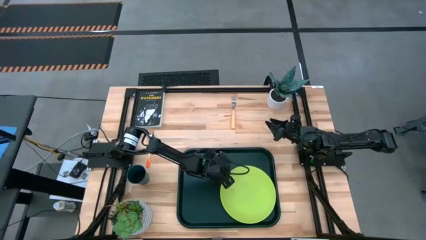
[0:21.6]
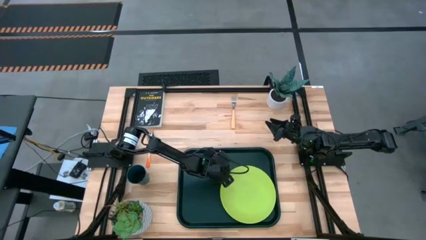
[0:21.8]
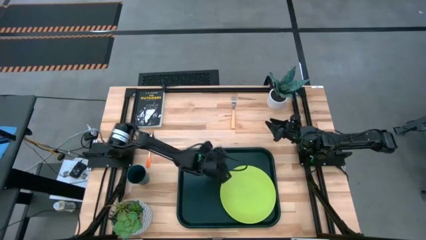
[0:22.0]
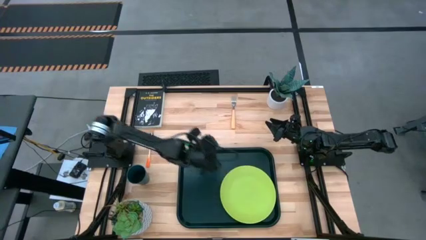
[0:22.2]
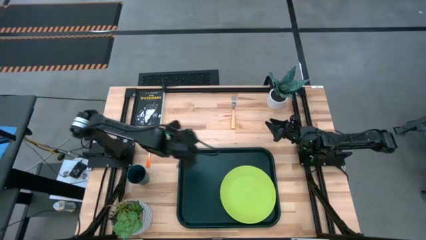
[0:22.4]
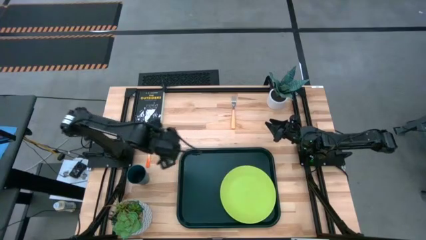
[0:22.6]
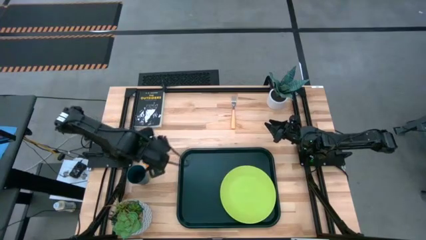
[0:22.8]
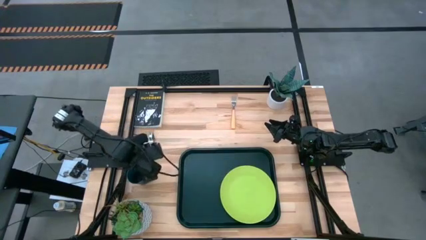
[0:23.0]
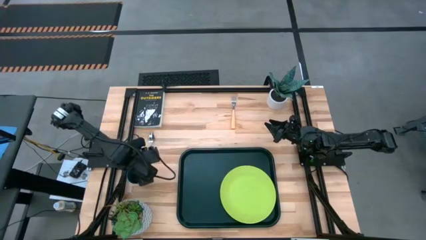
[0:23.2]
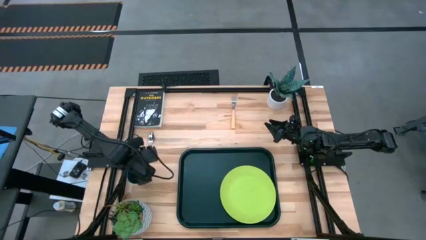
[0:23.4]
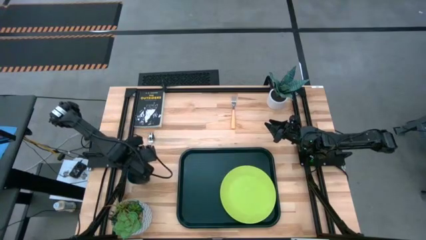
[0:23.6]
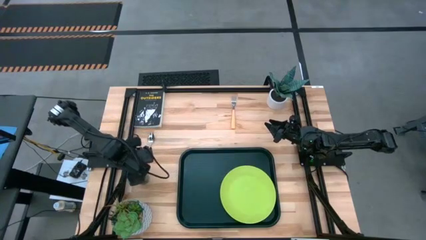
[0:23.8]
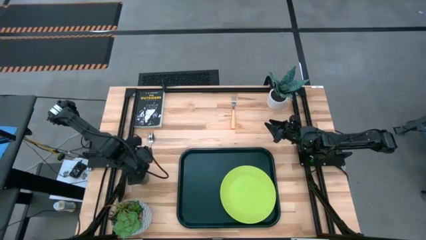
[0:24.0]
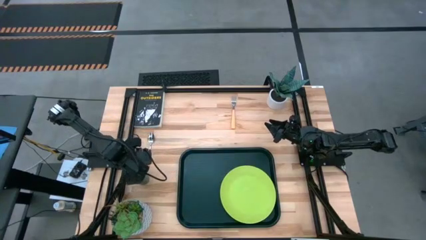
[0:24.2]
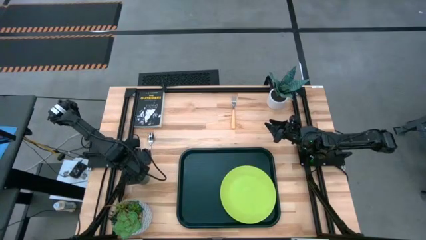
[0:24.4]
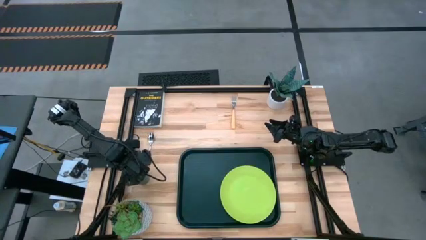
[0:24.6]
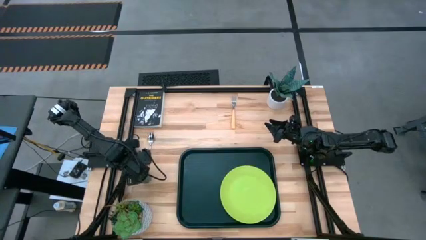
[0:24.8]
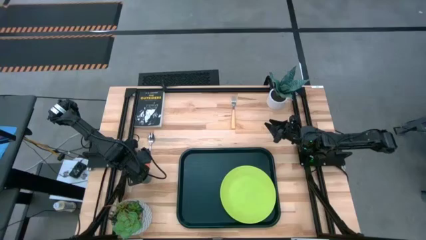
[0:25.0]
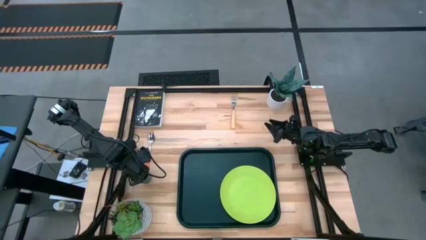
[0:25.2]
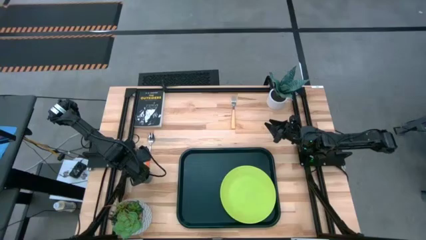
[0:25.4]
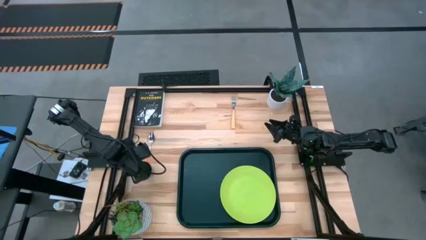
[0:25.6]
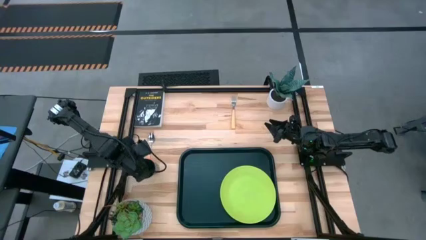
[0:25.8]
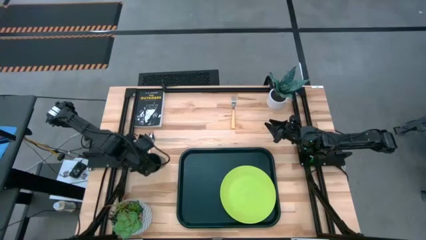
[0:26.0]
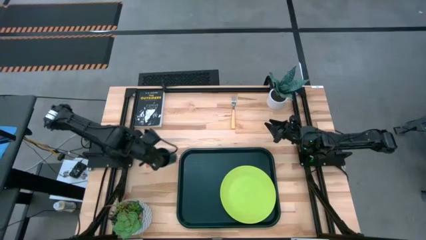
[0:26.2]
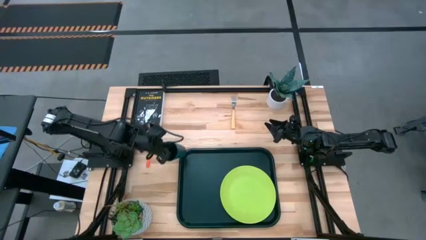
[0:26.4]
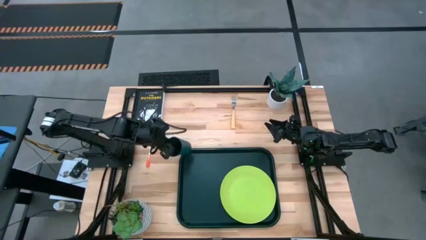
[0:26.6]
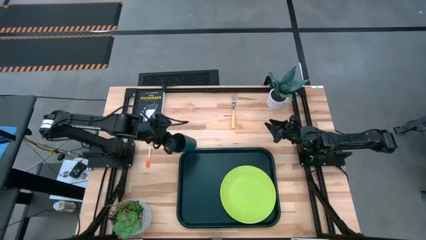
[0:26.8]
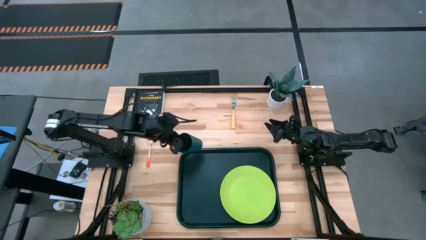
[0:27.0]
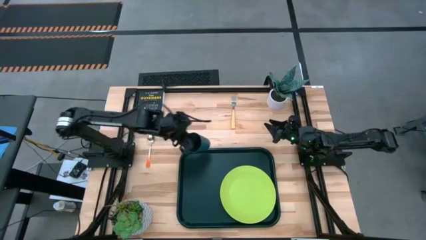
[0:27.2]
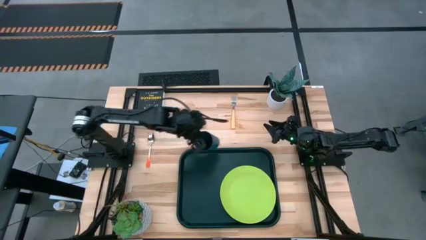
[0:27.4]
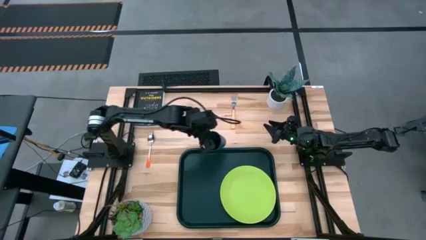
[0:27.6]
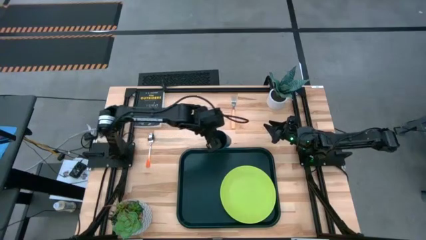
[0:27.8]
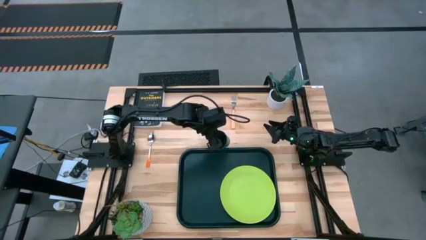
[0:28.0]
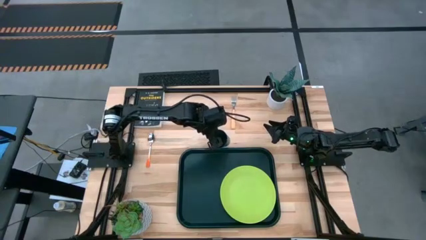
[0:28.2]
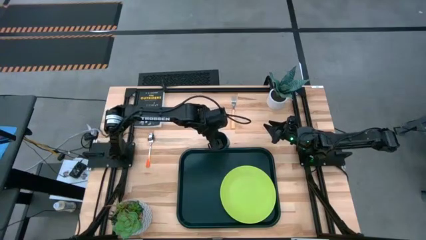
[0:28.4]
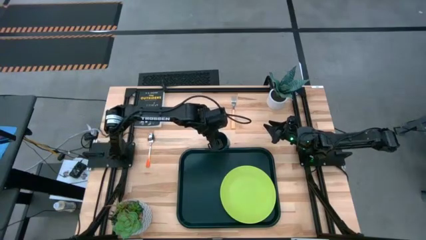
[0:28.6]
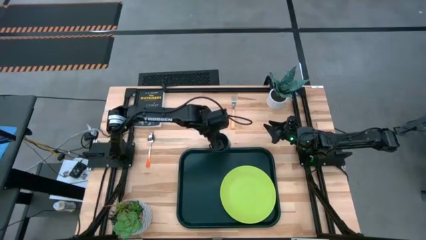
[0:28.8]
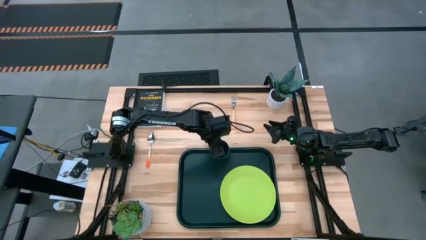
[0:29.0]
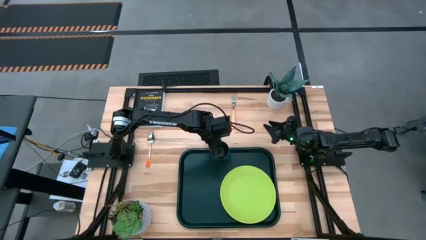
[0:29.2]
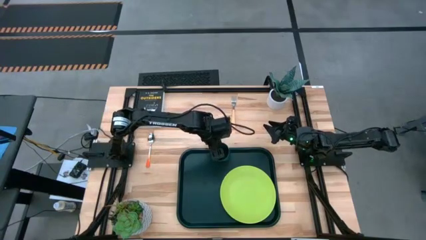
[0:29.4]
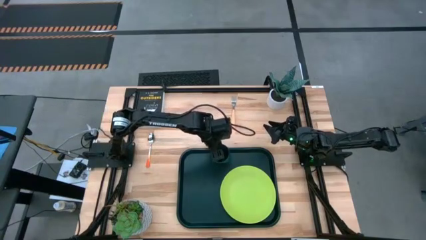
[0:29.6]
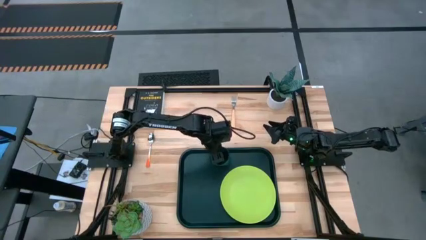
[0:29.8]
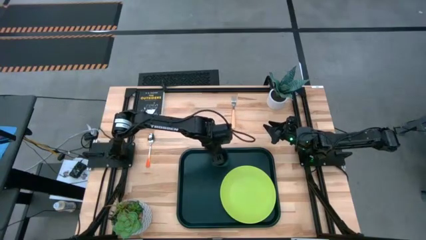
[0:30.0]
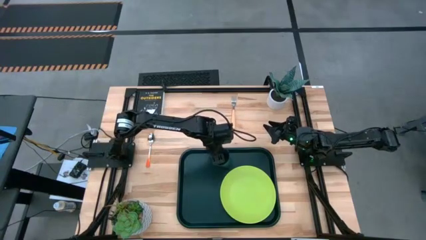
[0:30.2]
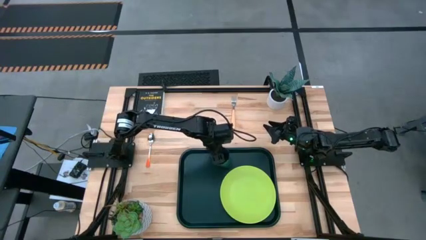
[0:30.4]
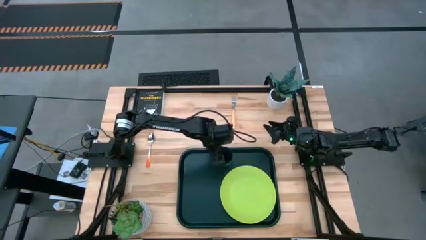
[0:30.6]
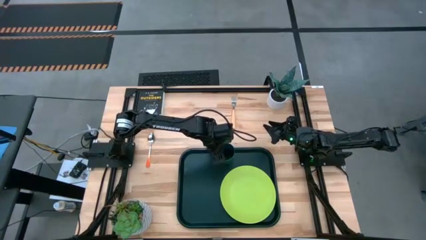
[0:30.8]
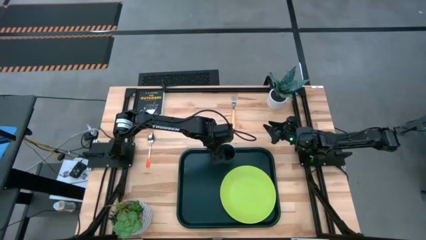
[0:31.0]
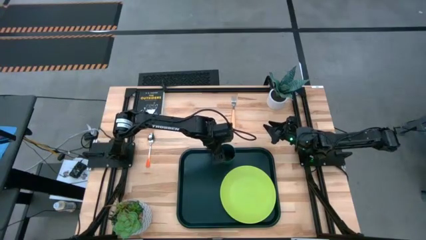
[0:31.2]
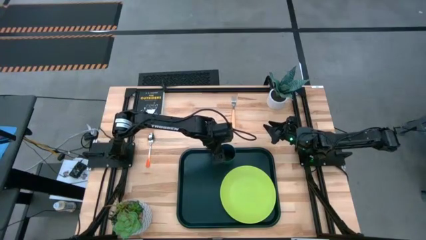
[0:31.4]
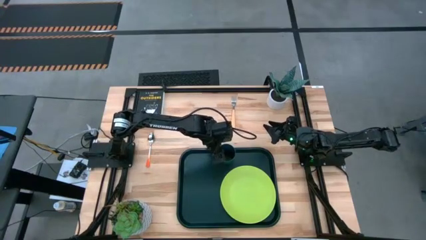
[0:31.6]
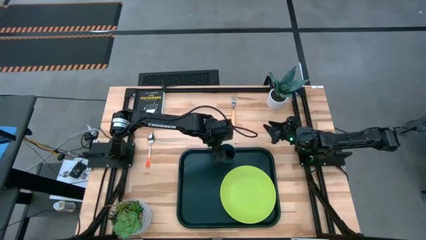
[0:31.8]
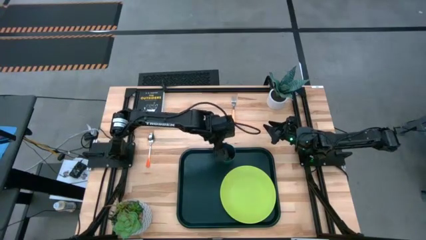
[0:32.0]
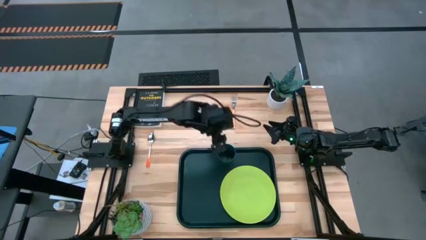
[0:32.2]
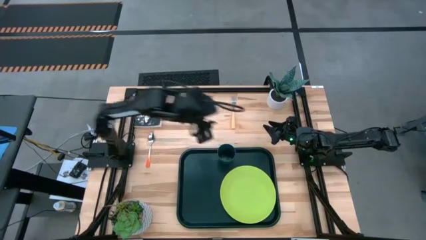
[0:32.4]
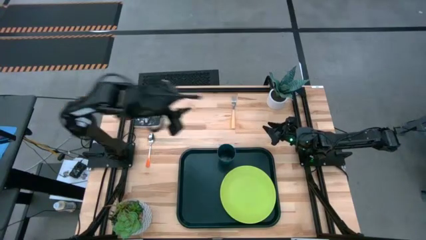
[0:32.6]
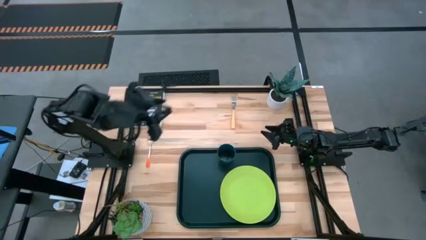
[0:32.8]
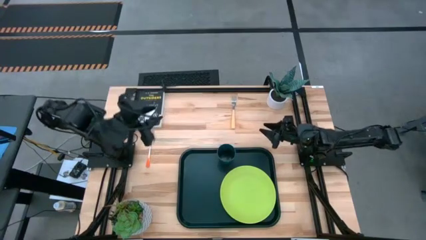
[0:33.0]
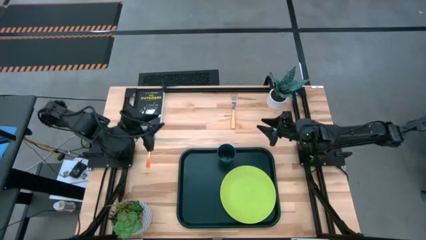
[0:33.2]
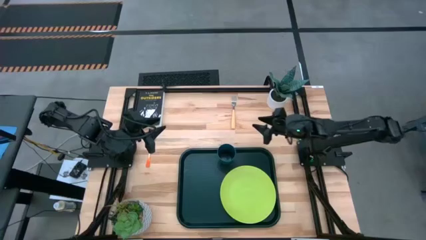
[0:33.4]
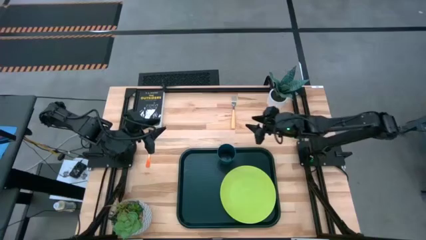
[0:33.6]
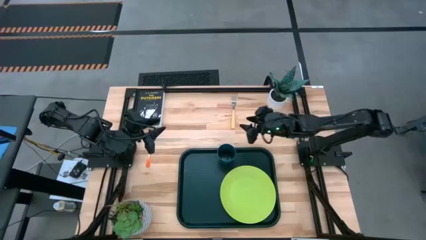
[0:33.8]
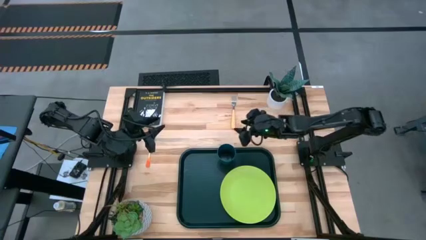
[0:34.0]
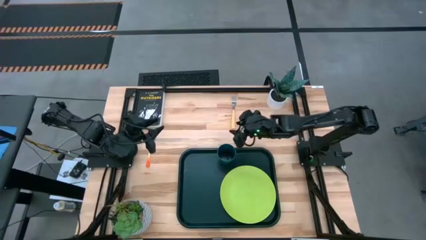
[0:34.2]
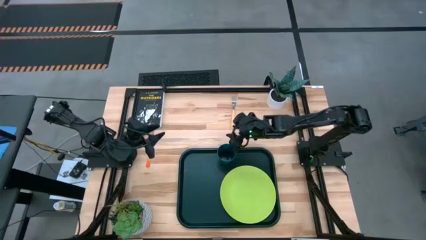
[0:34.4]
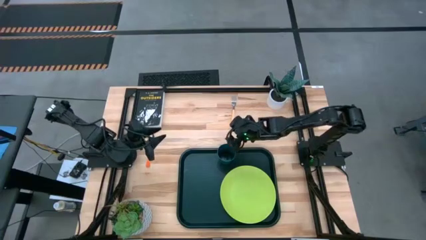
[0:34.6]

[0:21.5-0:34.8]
Task: Pick and place plate/cup/fork/spoon on tray
Put the dark blue cup on the black serving tray to the top right of the light green plate

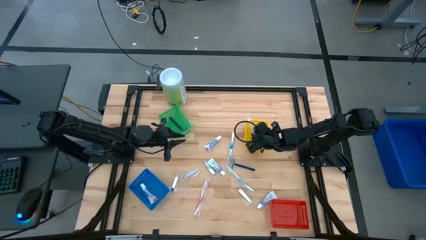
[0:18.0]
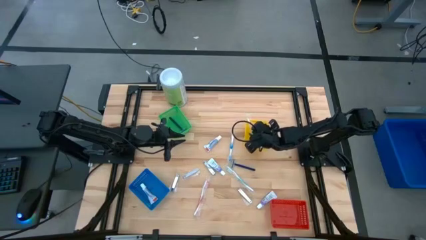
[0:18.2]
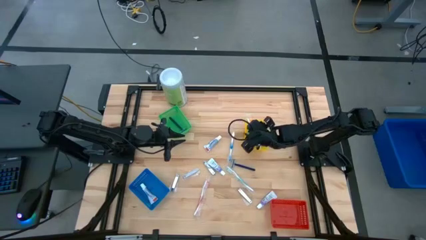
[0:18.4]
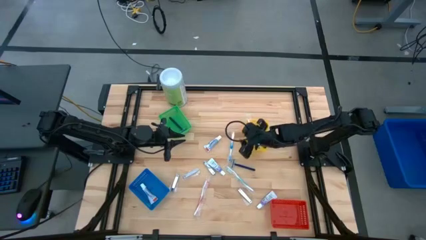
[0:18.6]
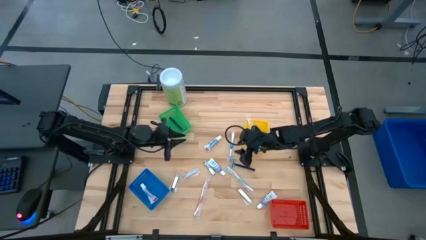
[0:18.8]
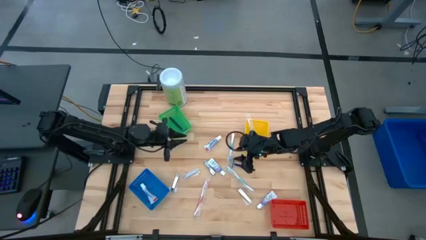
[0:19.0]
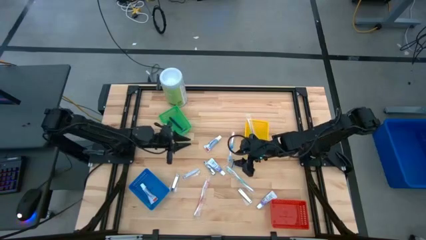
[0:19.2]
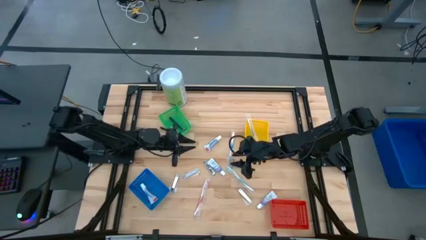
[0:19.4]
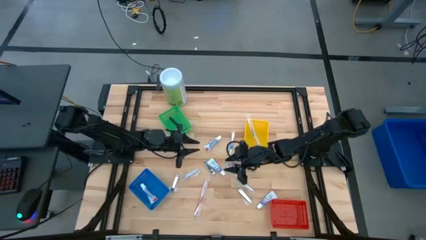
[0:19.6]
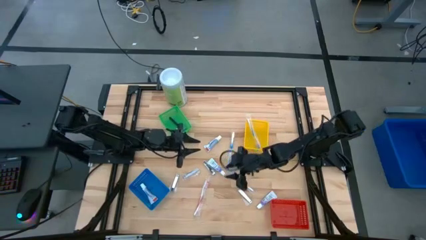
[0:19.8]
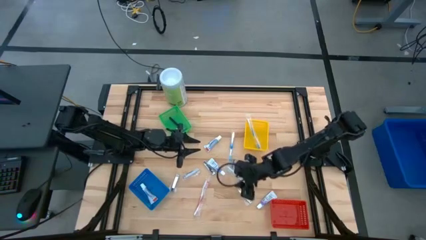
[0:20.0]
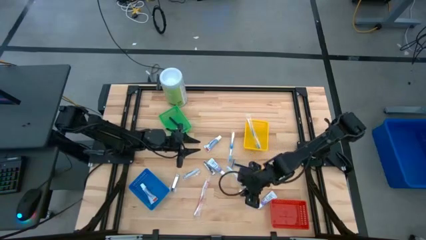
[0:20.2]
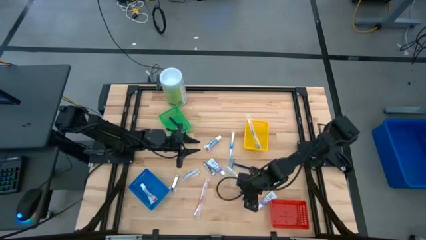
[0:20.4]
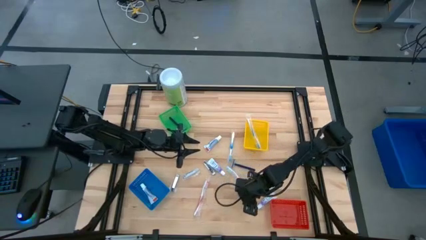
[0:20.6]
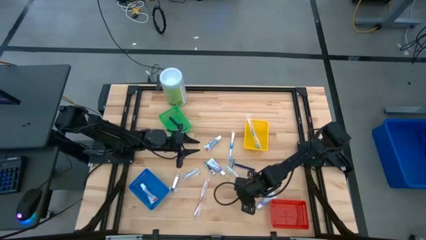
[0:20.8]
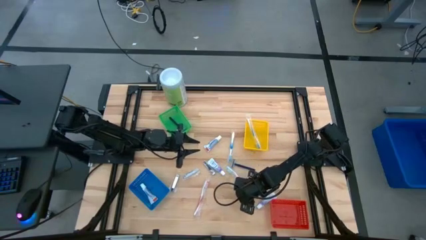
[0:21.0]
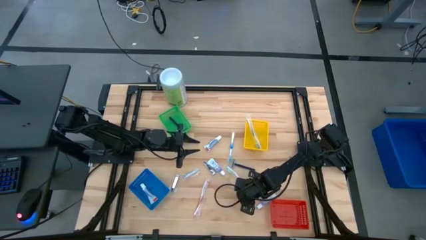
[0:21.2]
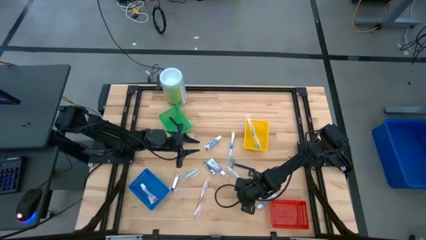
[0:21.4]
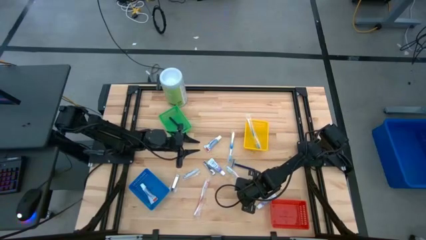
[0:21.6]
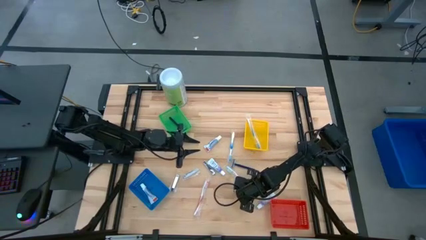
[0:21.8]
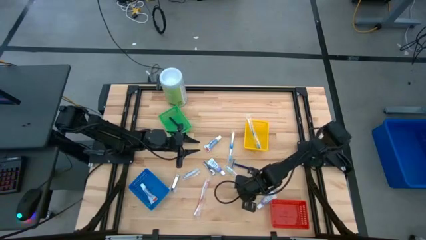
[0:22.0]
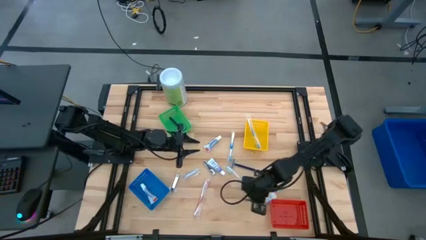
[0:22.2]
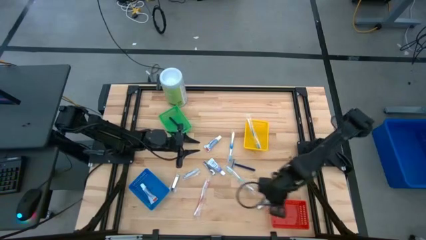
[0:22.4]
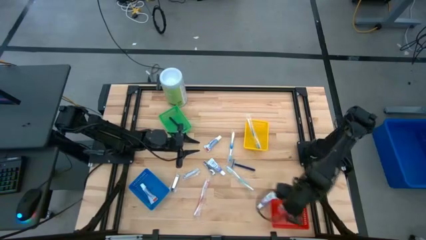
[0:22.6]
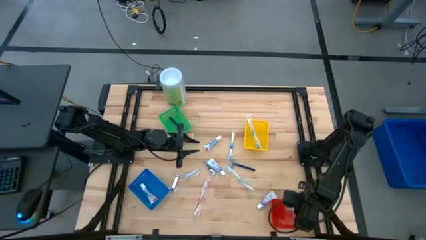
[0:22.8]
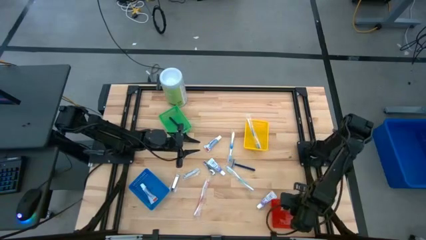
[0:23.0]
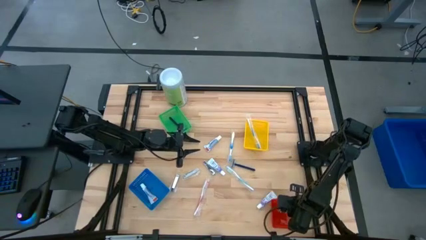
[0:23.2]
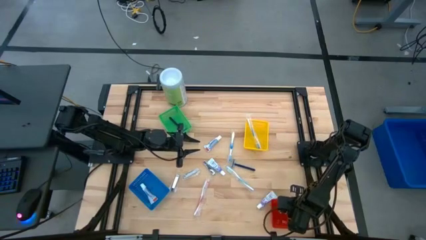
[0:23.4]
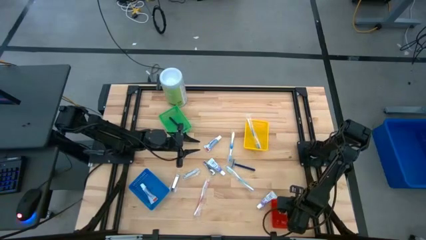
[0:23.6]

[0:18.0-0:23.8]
Task: Pick & Place Travel size toiletries
Put the nail cutter into the red bin
